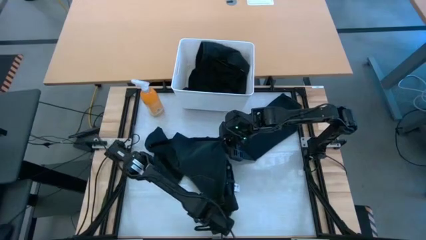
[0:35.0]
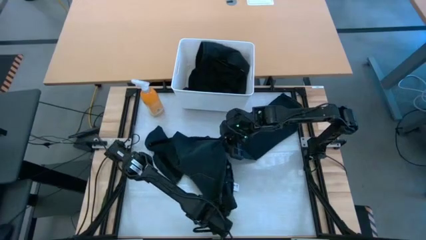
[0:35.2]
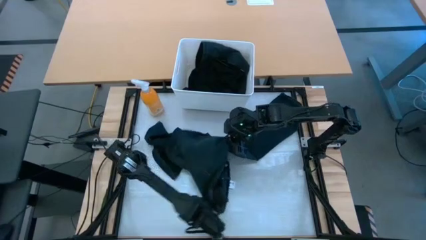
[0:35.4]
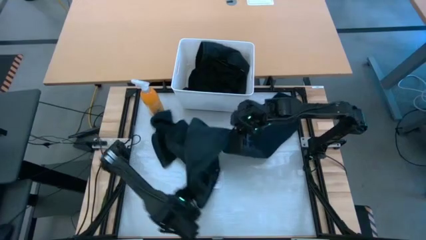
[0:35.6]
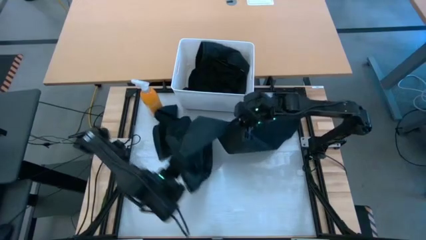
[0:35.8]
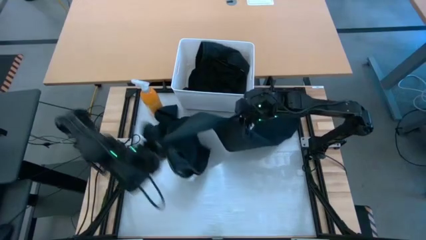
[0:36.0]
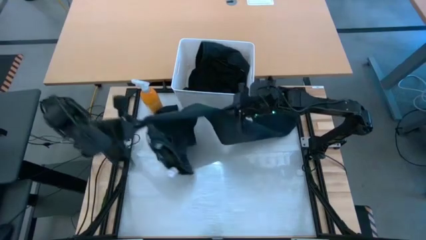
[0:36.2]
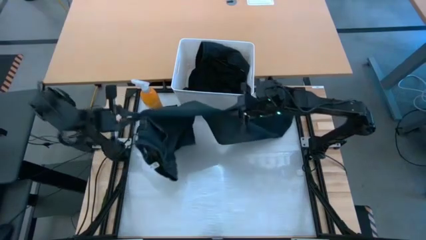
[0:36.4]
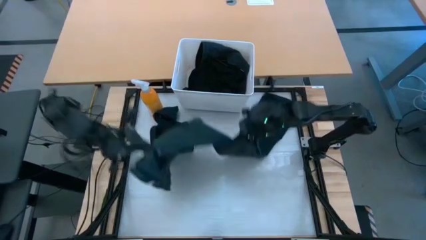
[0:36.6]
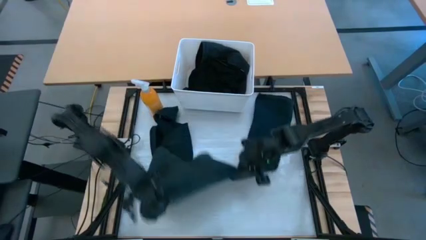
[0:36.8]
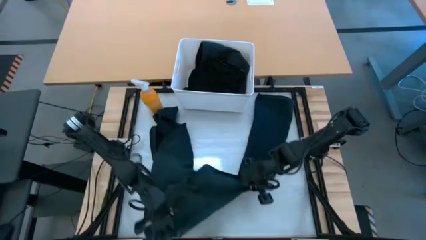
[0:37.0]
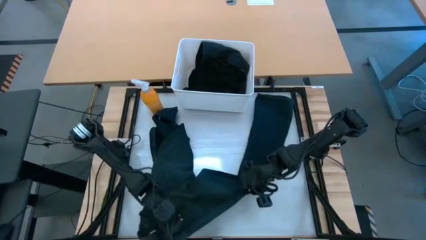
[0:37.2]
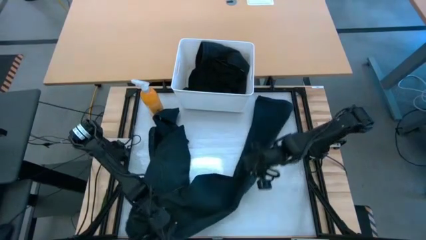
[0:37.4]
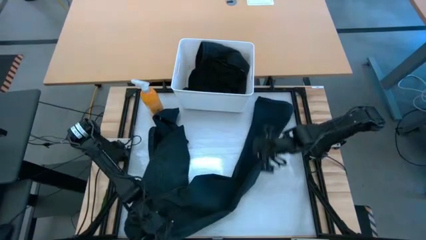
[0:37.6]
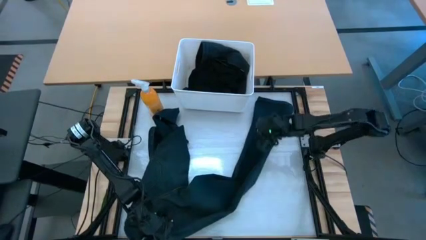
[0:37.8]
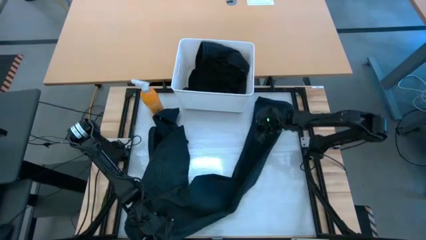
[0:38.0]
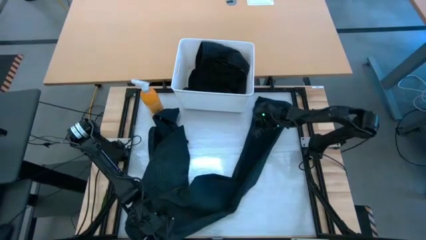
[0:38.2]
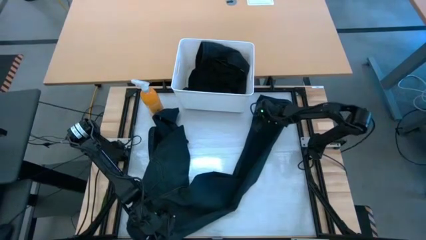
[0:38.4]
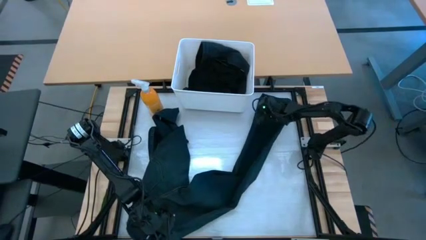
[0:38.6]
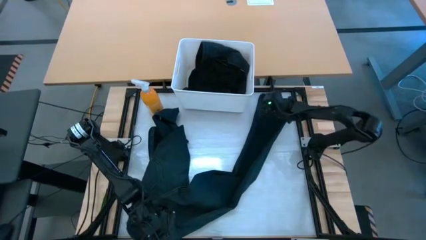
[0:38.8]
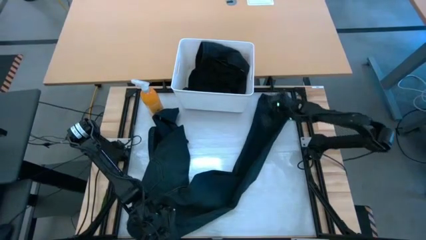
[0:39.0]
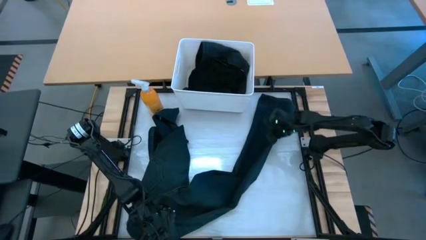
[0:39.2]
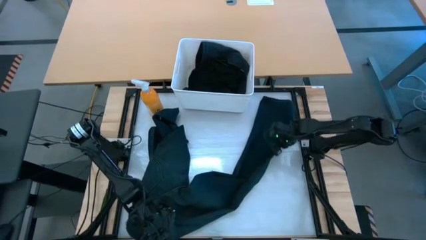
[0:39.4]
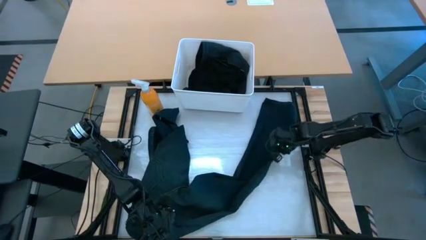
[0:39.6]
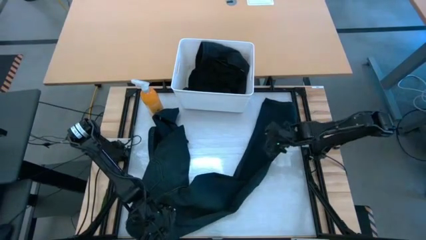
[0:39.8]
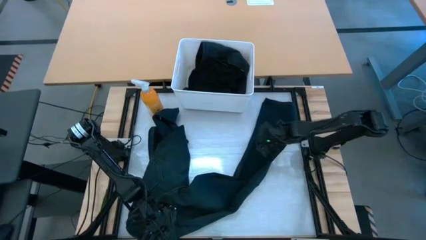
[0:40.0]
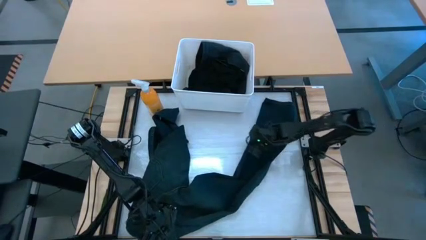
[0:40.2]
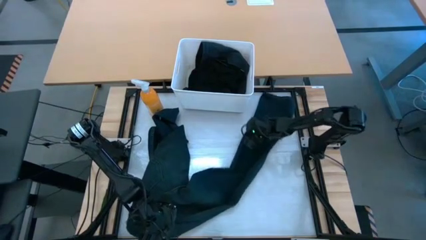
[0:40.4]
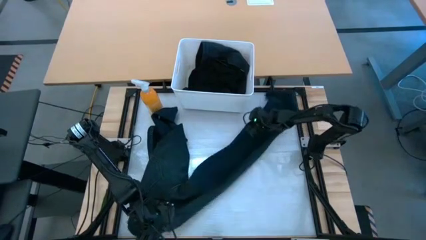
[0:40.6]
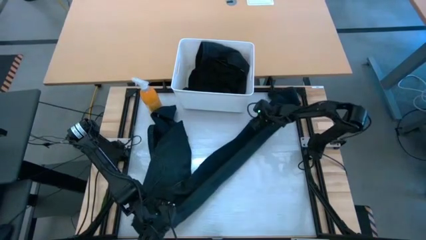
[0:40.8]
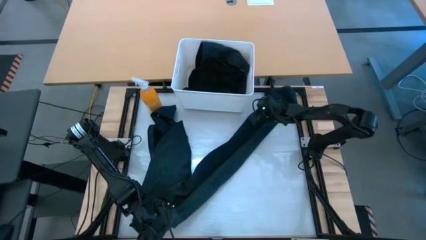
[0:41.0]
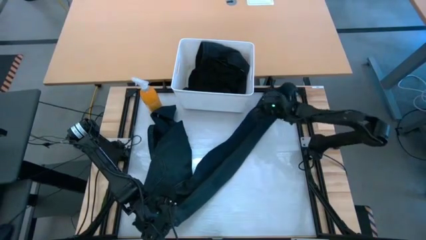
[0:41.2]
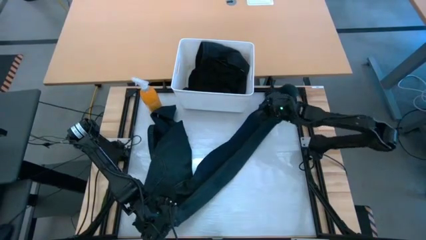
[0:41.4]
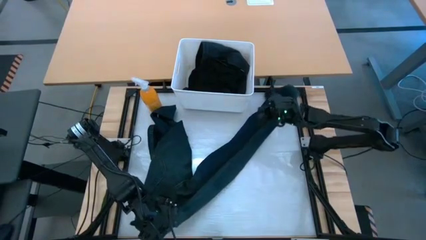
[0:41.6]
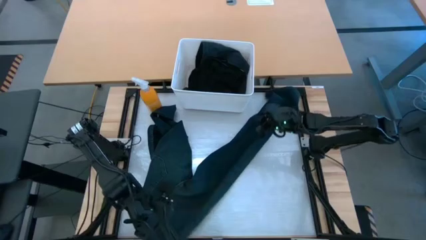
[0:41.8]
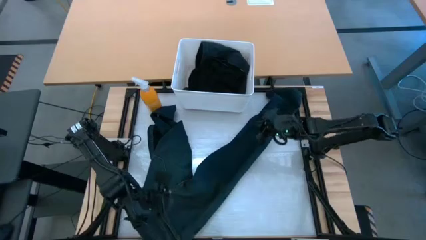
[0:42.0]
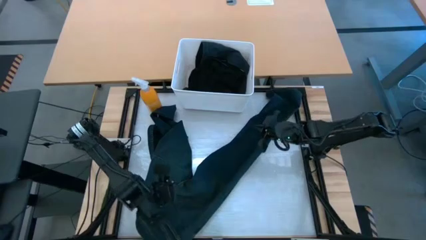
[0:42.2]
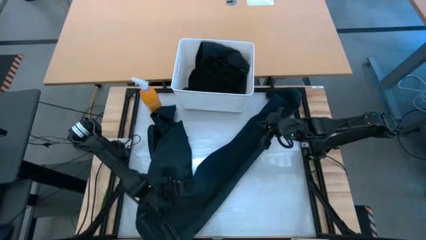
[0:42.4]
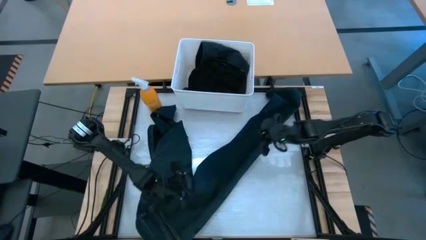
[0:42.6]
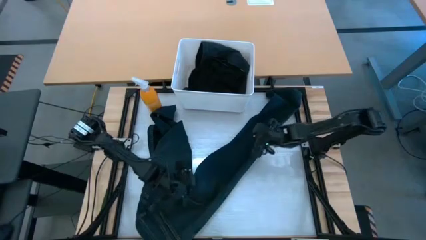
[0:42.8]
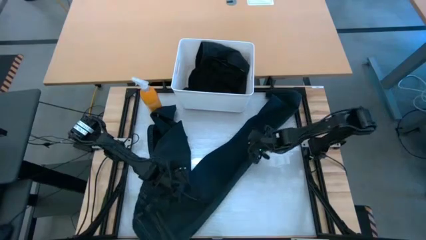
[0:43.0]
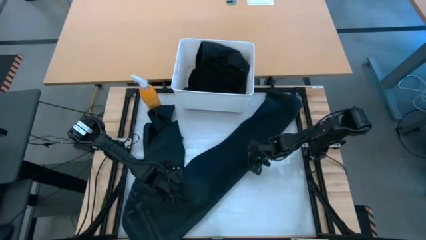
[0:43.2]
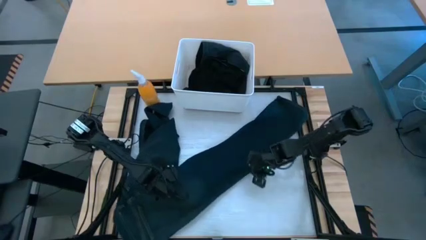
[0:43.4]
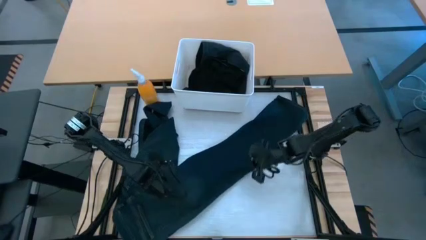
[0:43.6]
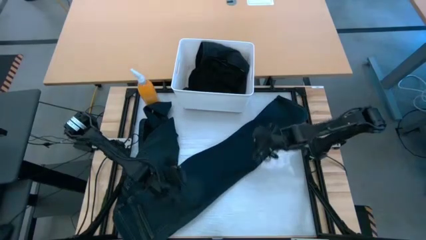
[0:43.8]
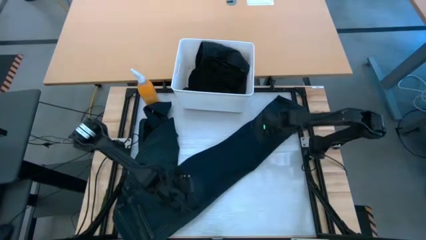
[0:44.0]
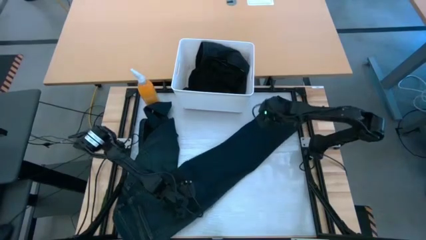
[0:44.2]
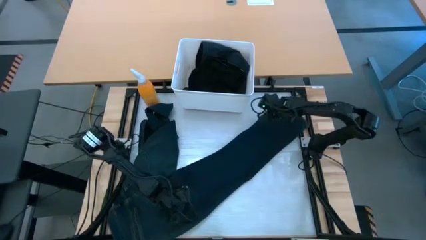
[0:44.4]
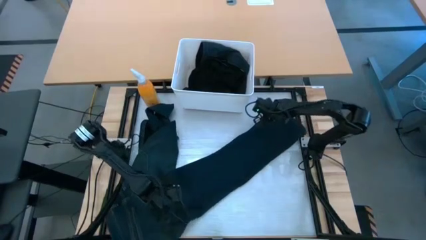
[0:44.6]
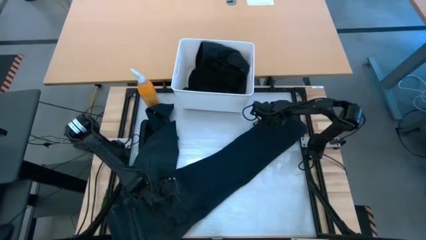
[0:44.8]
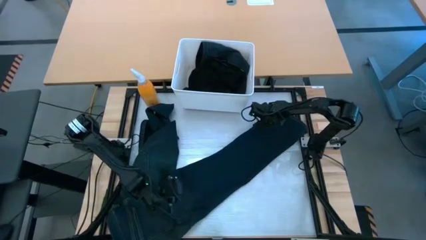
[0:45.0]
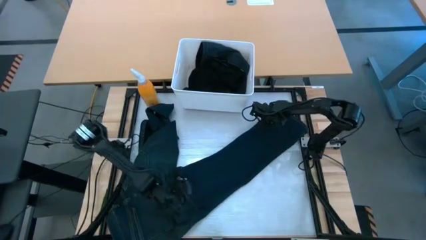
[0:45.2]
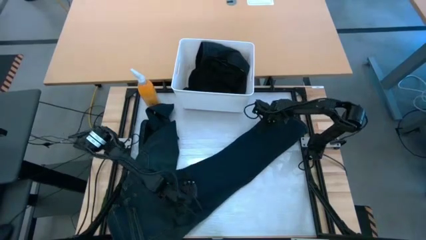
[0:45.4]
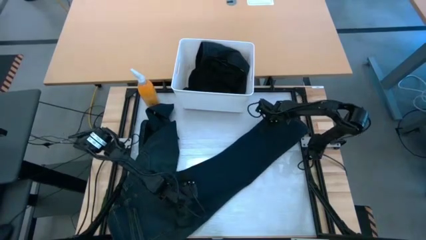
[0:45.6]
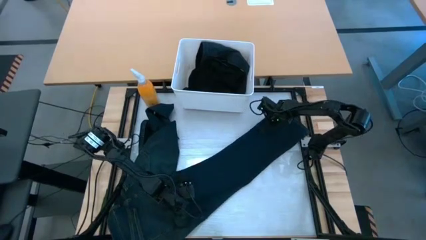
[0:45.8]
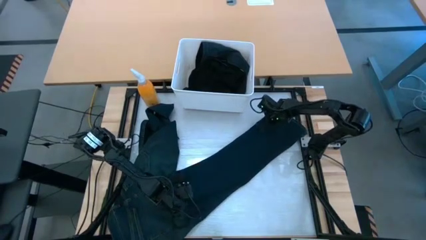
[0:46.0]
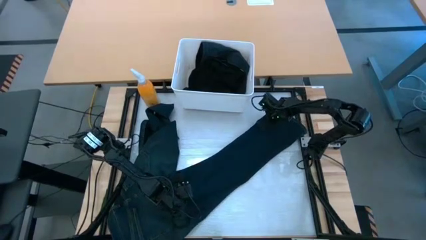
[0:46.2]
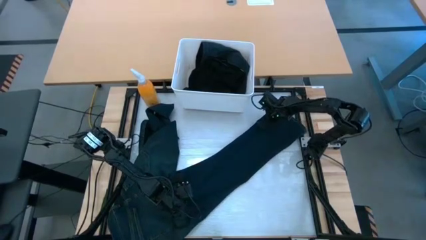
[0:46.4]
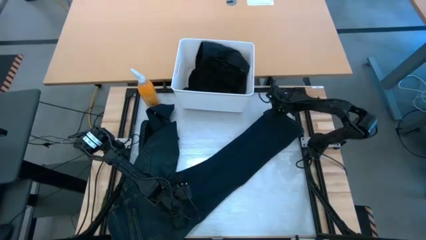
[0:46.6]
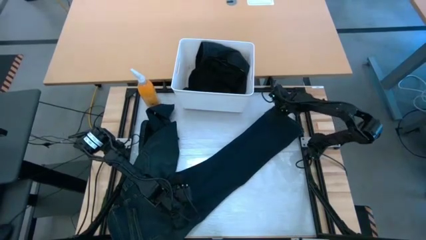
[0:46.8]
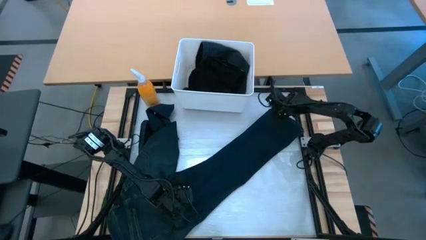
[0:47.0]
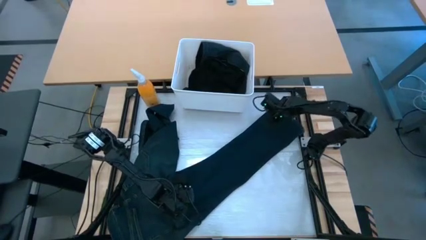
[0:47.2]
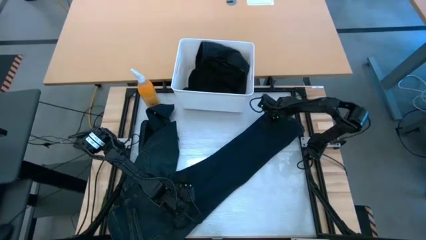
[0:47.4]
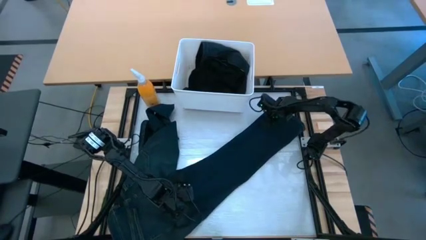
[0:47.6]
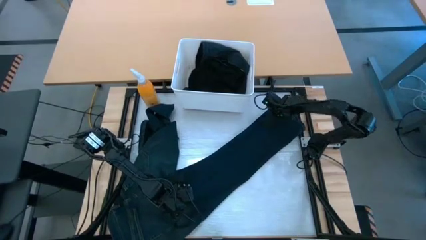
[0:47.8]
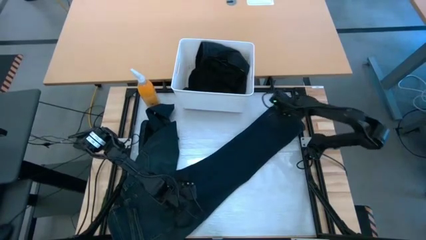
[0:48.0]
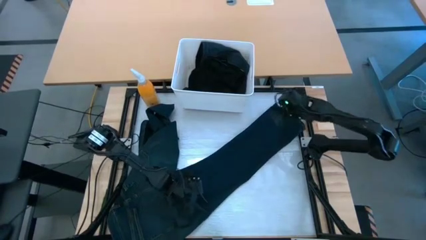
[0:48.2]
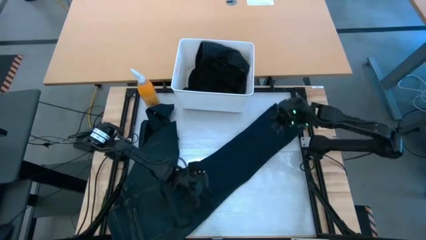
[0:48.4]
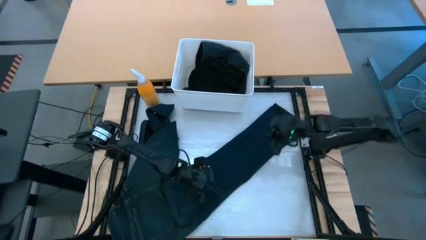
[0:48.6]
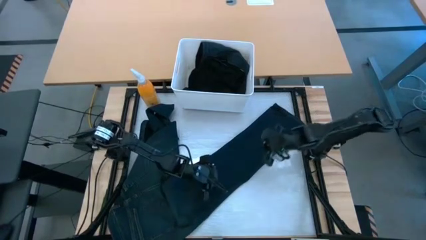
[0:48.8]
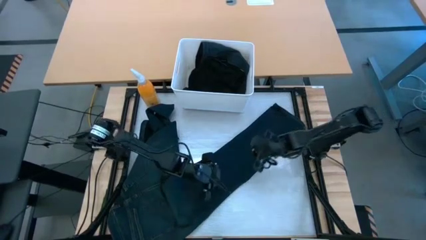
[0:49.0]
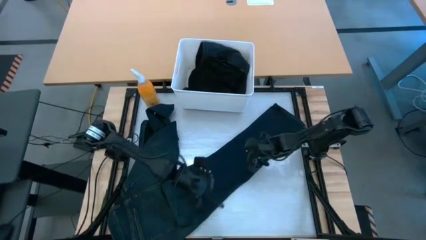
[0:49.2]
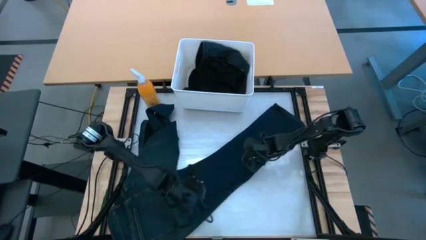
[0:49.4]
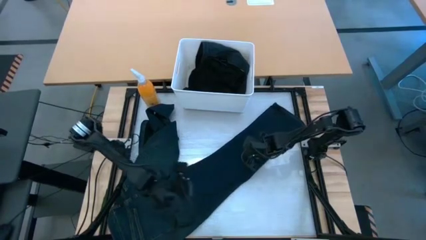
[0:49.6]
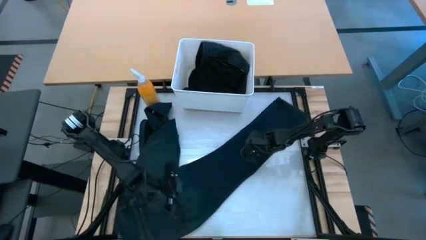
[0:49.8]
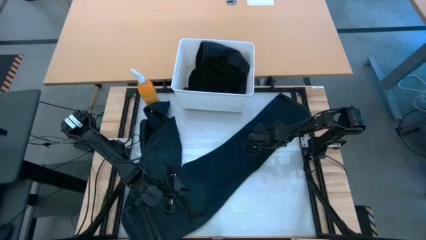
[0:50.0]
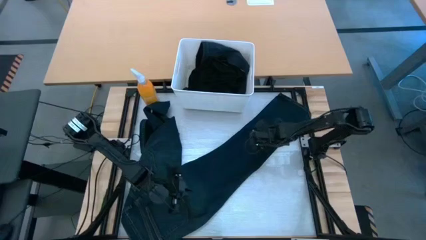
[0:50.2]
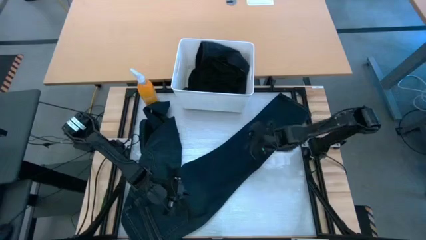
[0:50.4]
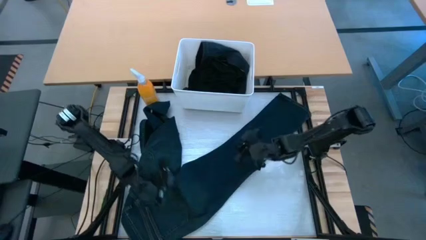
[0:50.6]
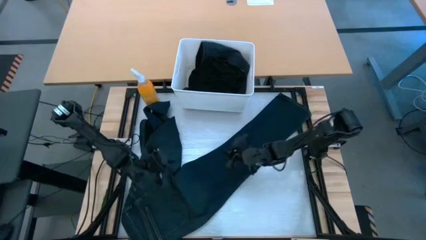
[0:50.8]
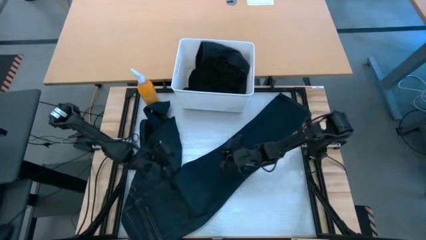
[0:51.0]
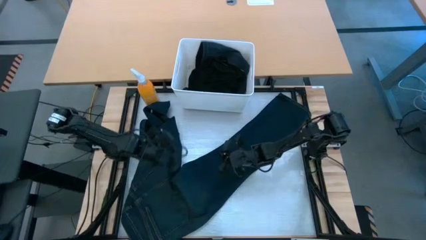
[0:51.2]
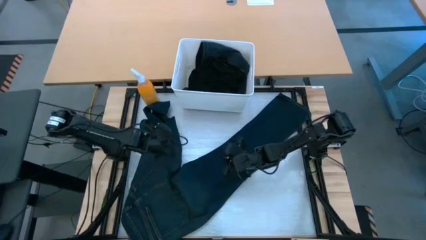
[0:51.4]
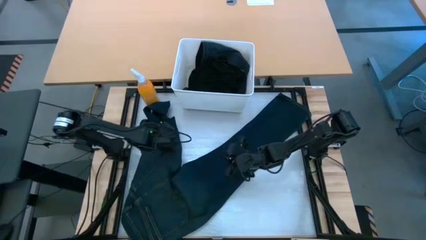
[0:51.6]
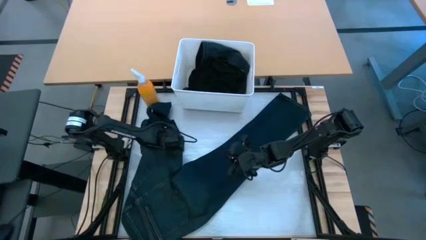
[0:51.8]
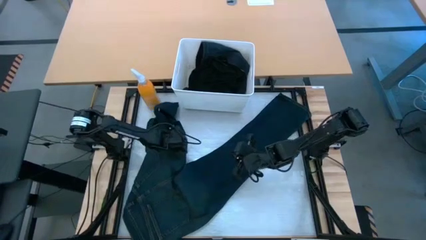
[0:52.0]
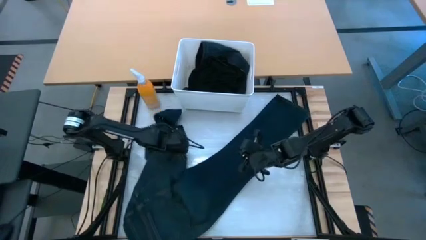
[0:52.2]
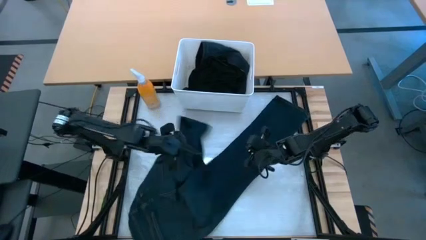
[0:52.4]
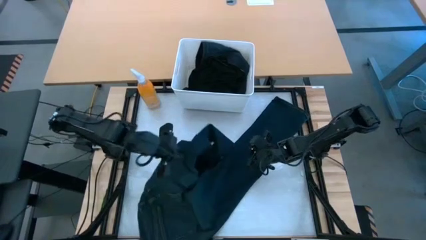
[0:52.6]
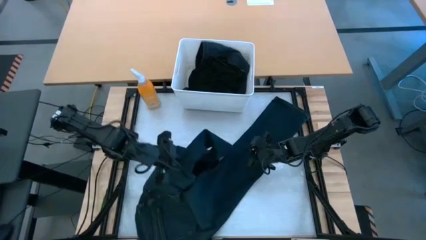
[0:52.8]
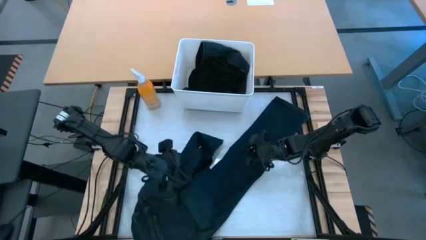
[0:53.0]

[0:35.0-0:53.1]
Task: Fold laundry
Fold the blue long pants
